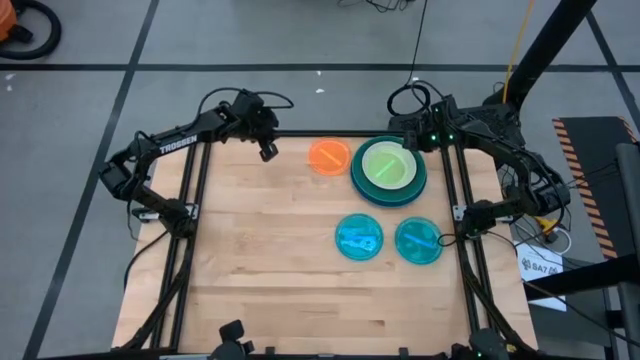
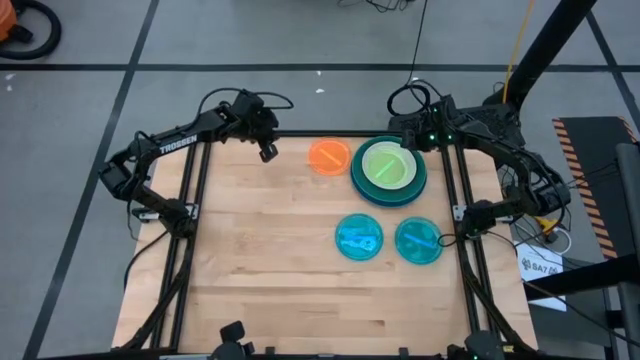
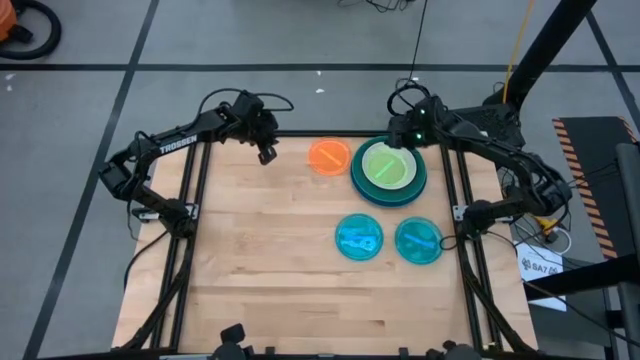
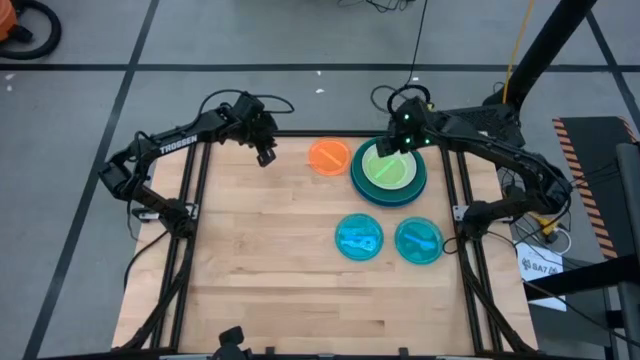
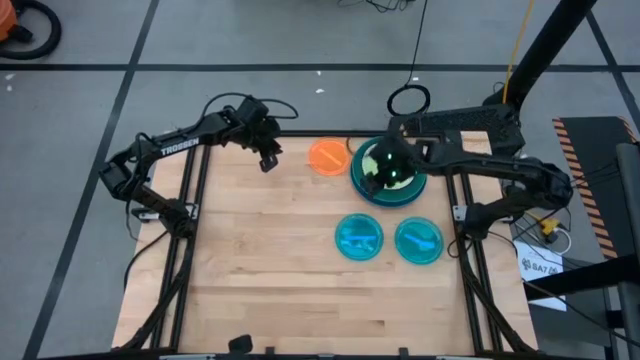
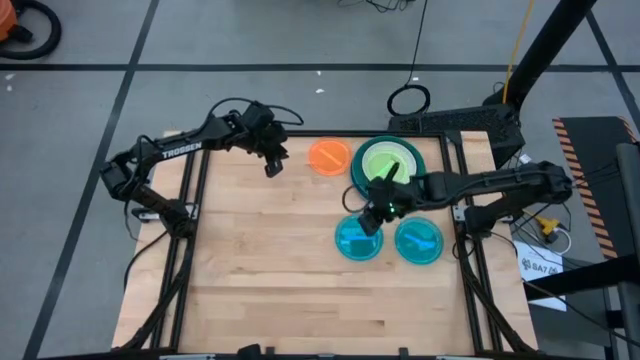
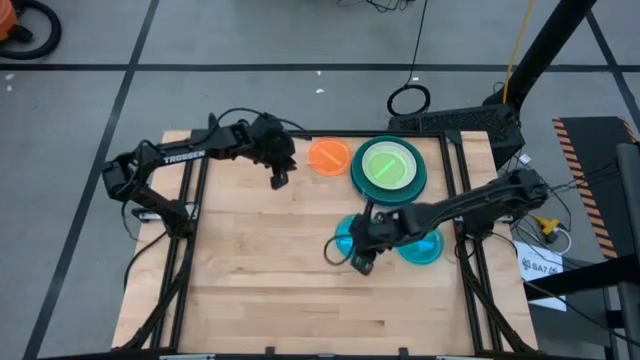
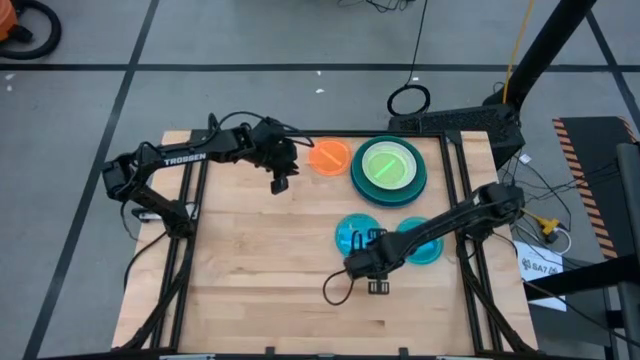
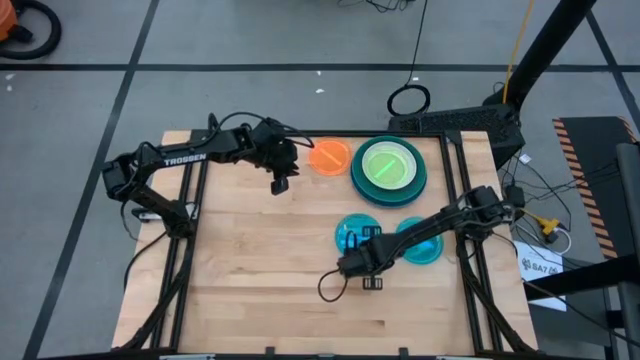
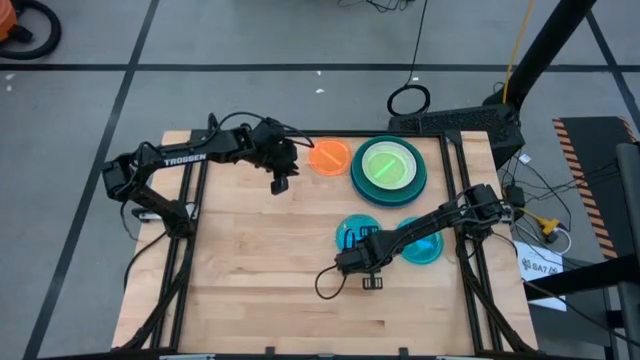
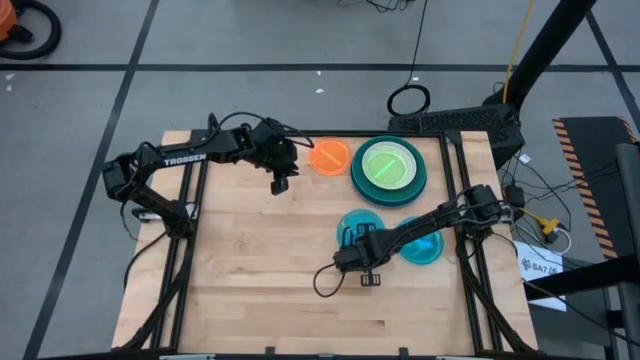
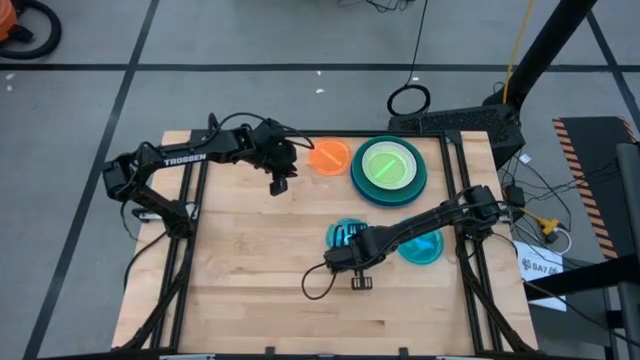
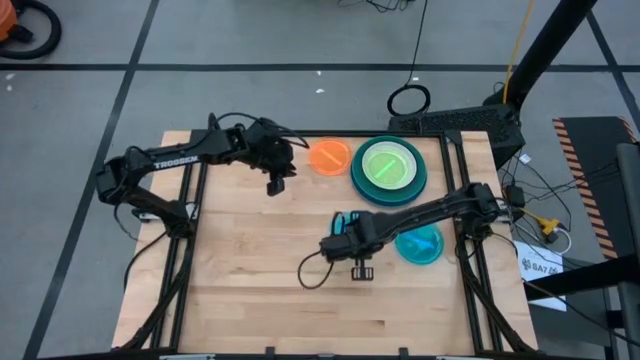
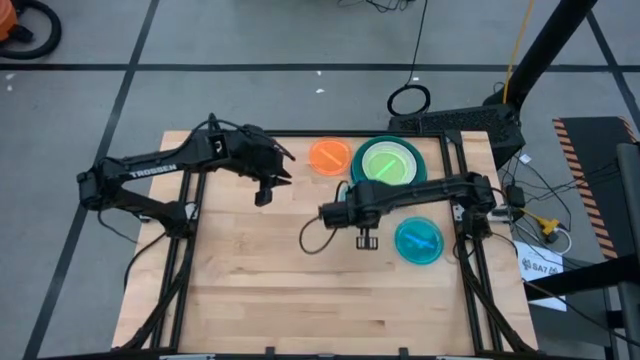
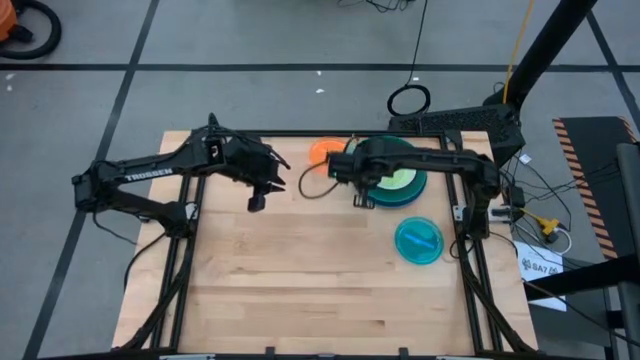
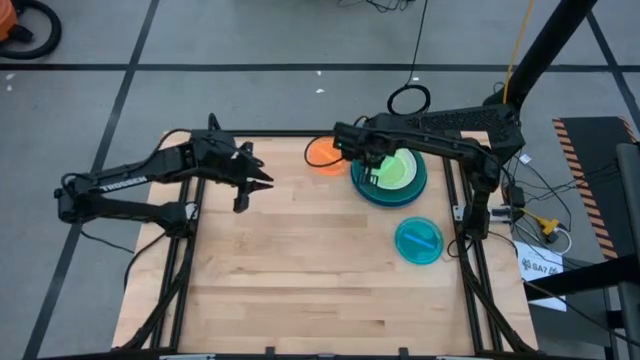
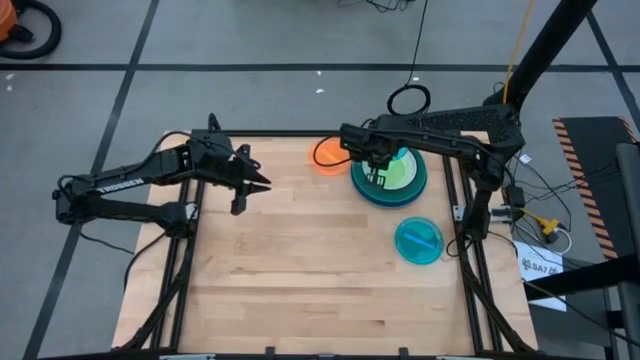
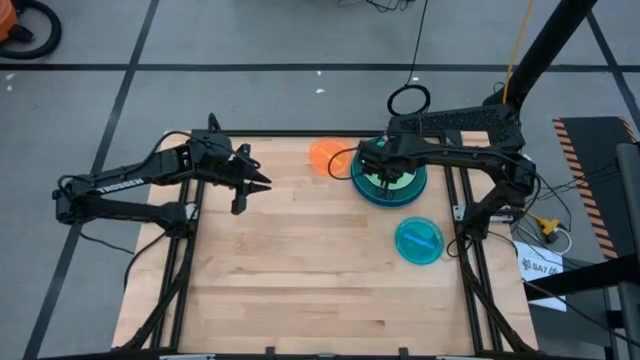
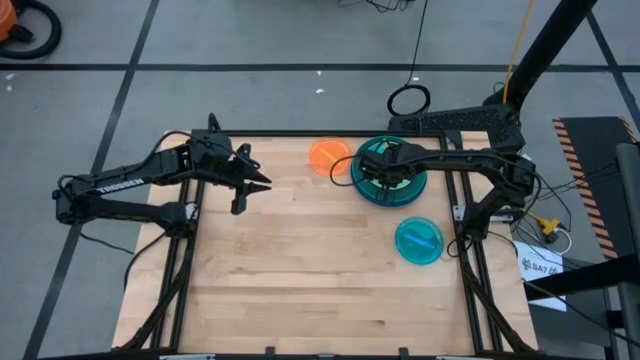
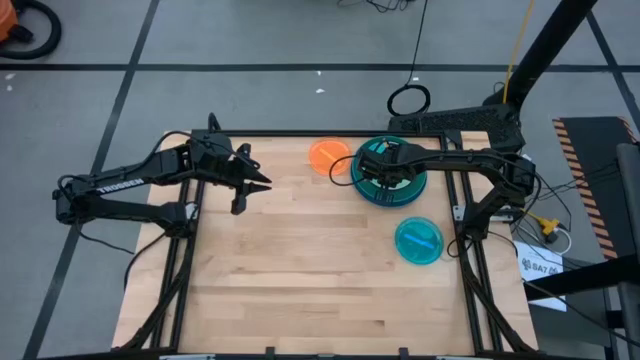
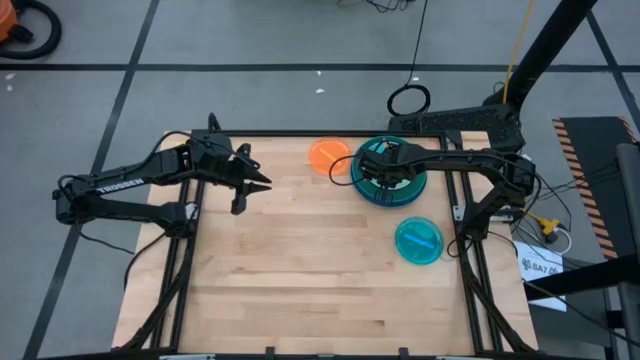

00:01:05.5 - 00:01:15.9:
Task: Stack plastic plates
Stack the left light blue plate on top of the light green plate

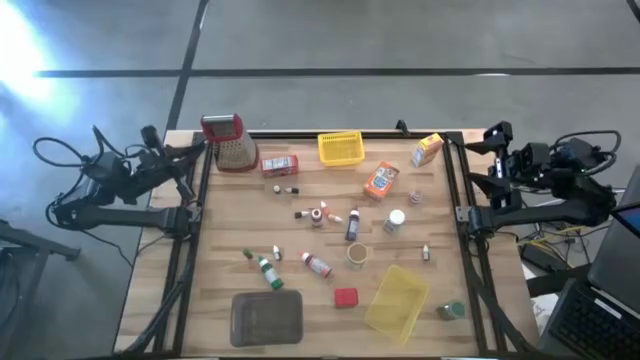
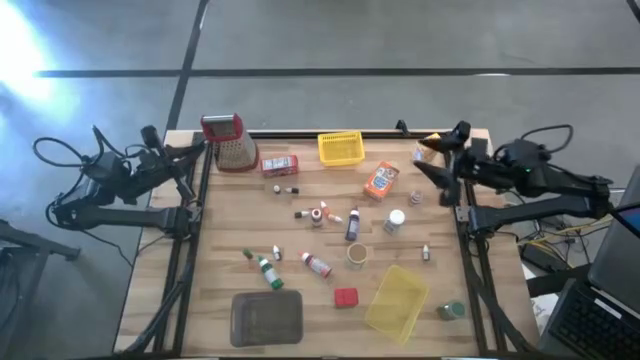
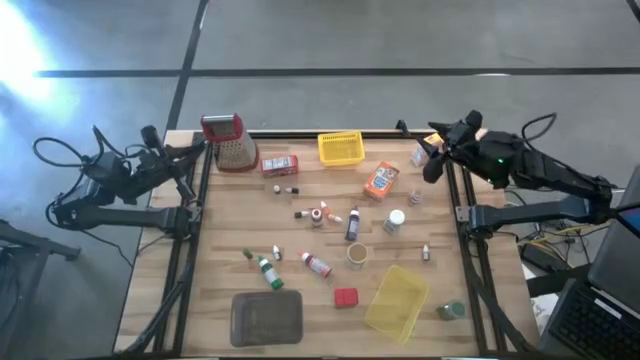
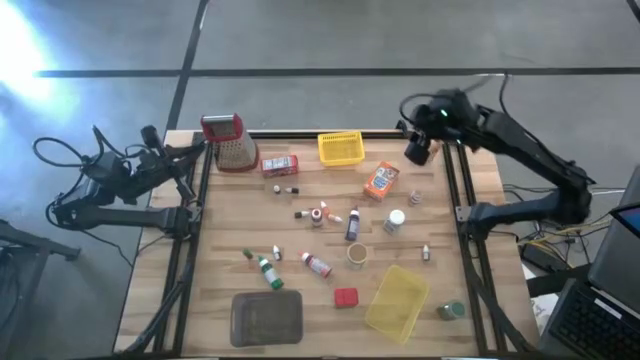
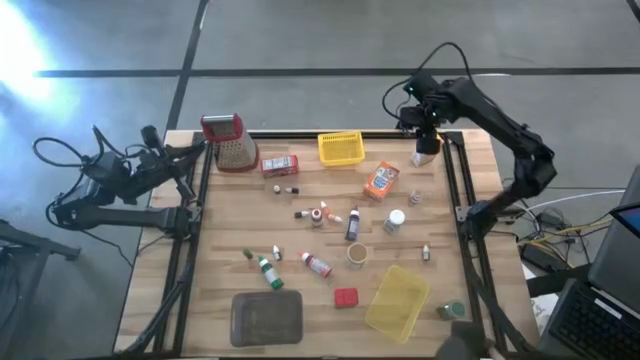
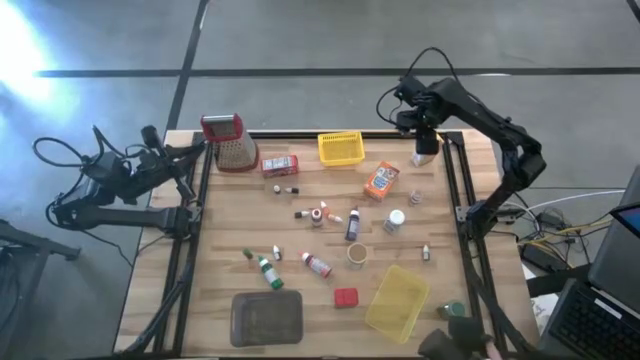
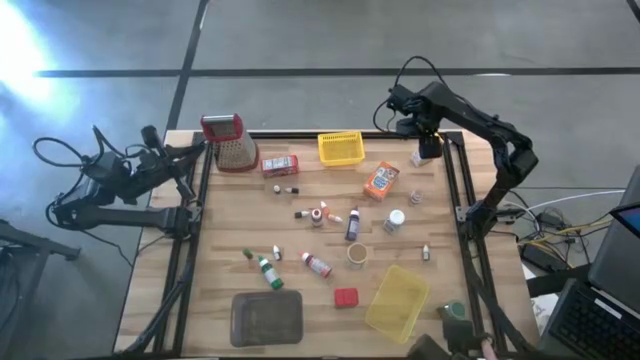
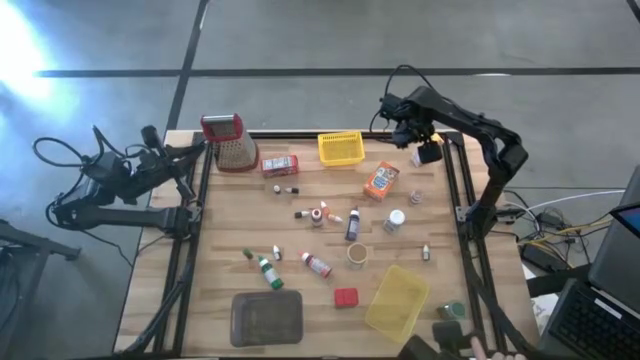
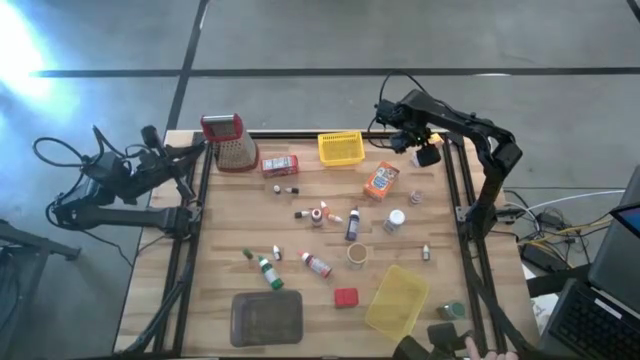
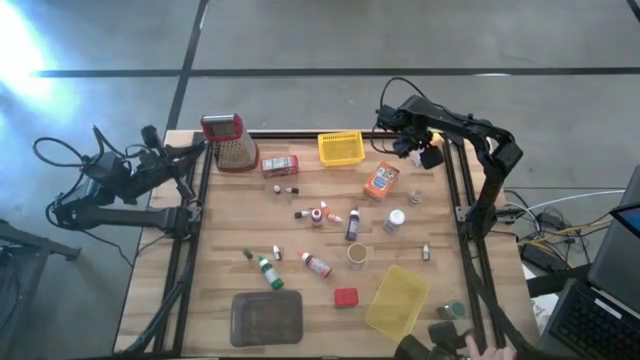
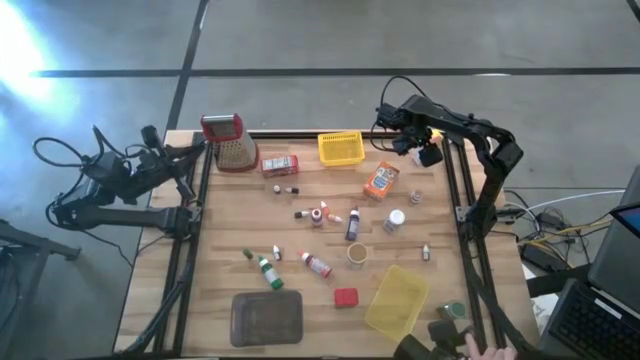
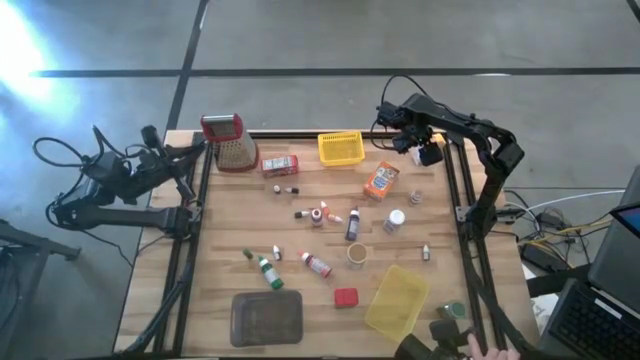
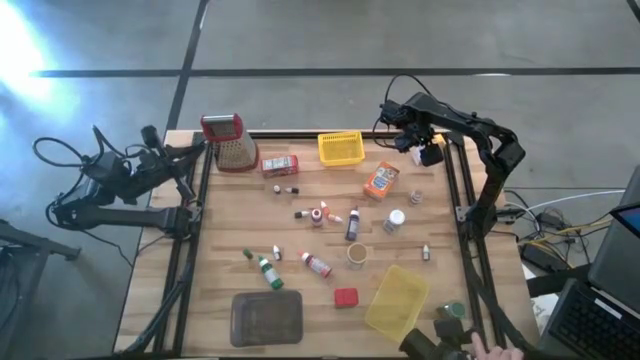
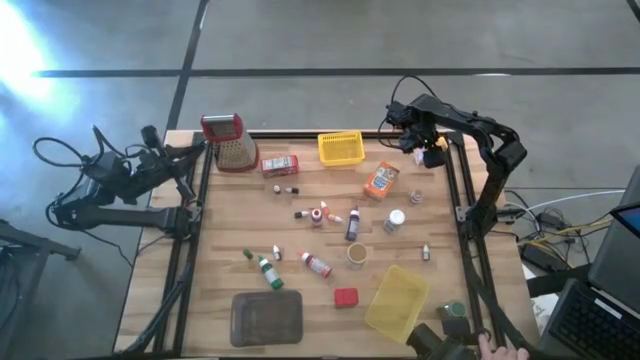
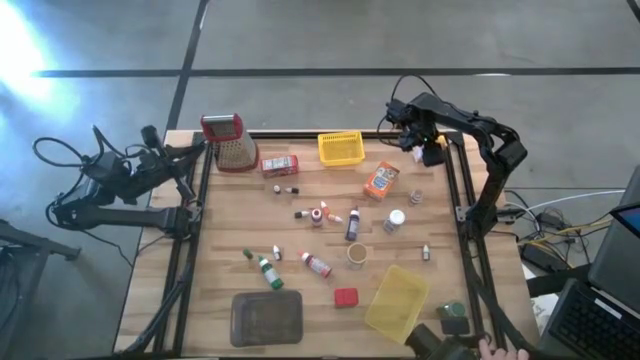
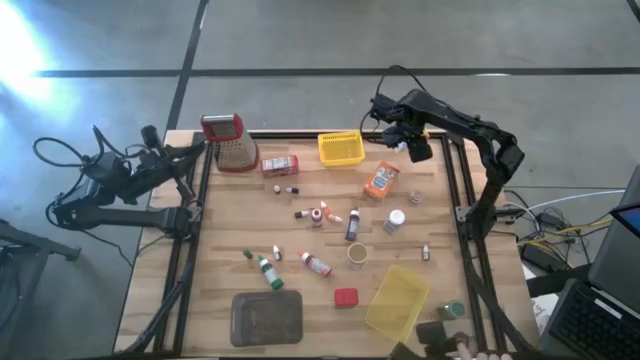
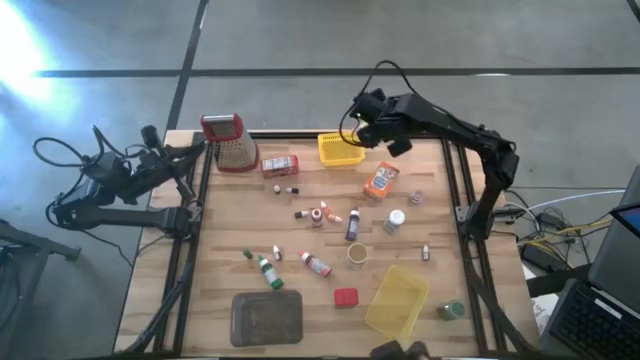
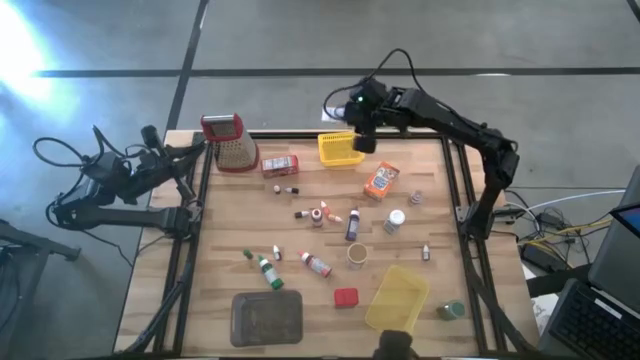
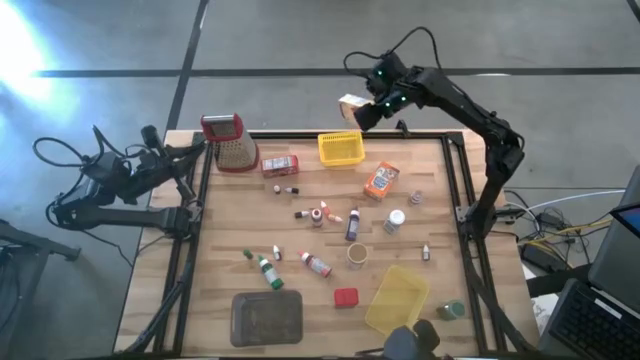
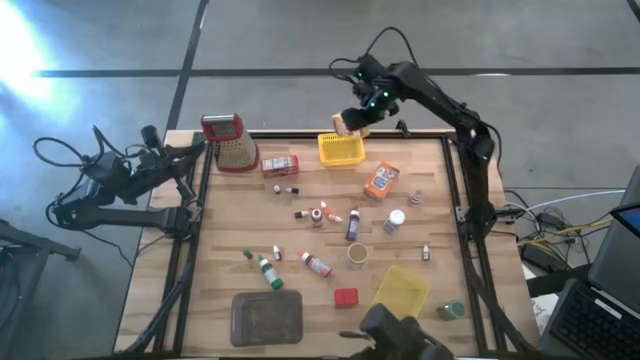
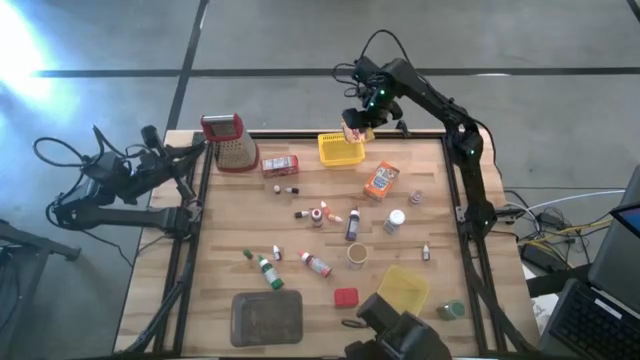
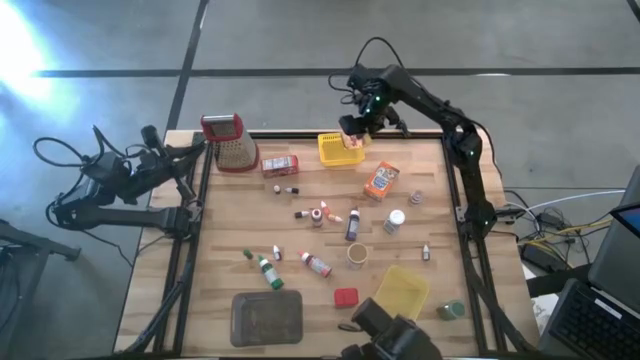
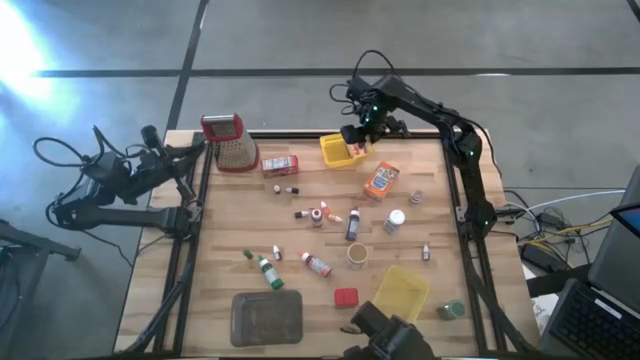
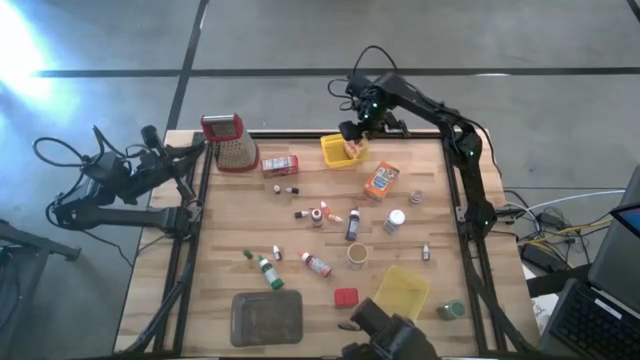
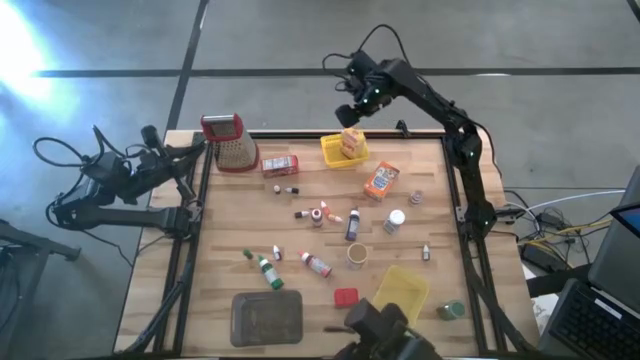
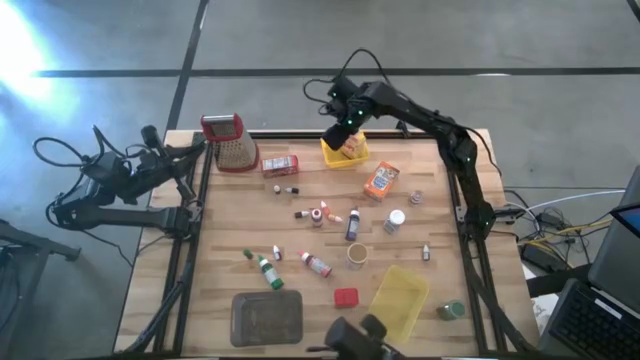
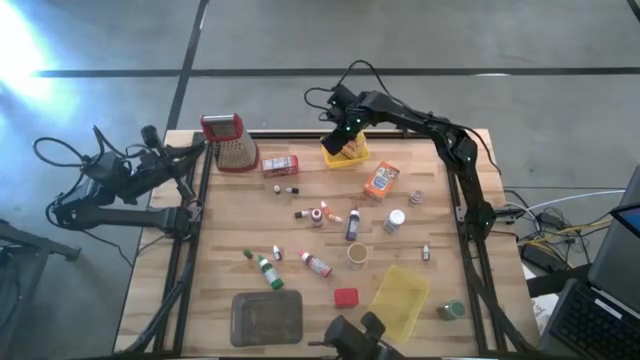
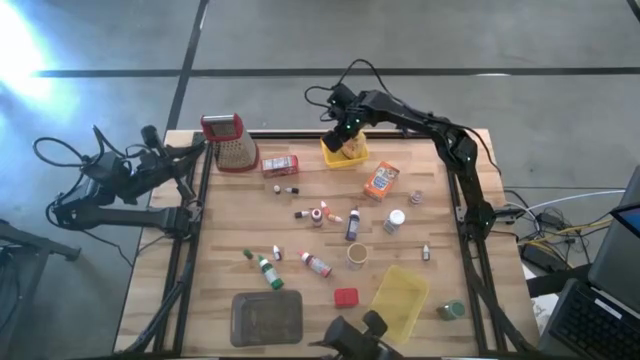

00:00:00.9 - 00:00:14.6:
Task: Pick & Place Kitchen Items
Put the yellow cereal box into the top yellow bin
